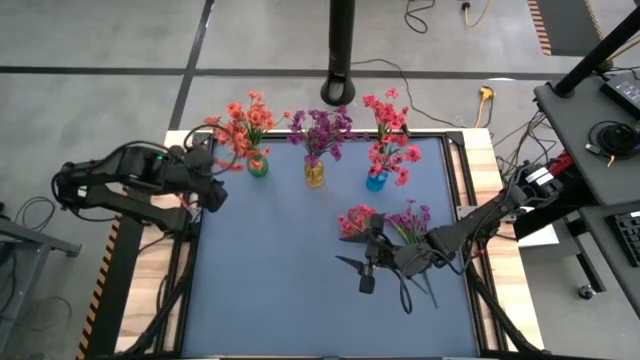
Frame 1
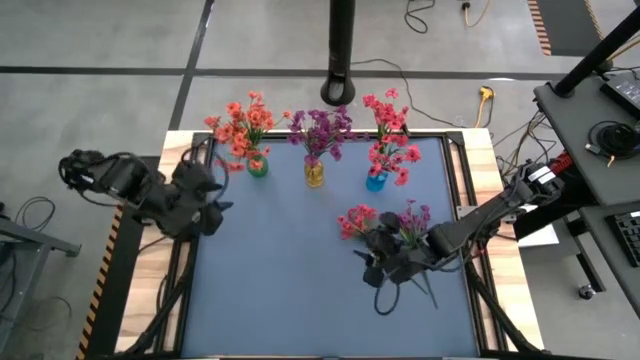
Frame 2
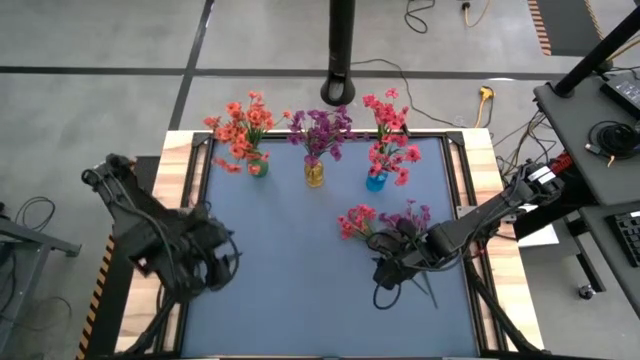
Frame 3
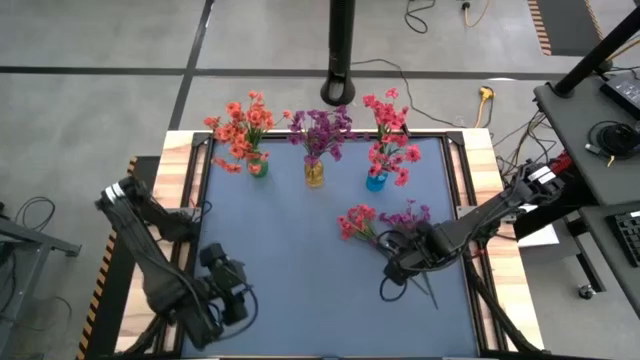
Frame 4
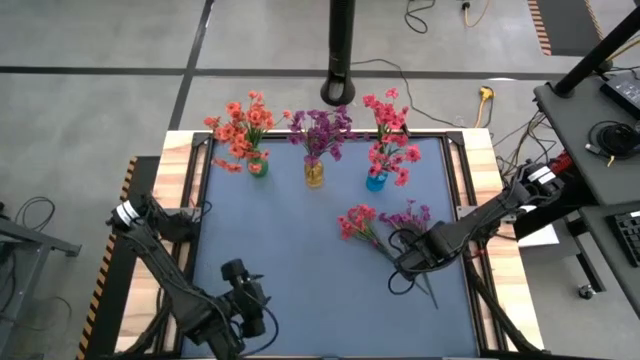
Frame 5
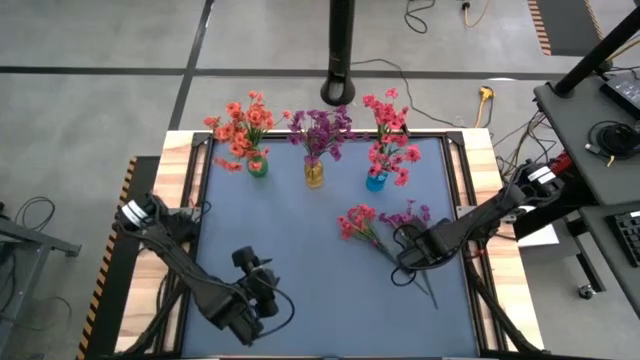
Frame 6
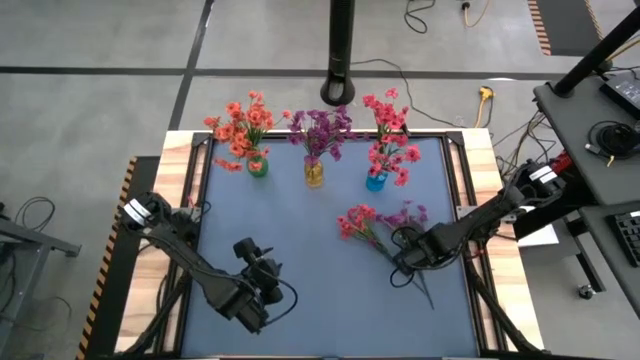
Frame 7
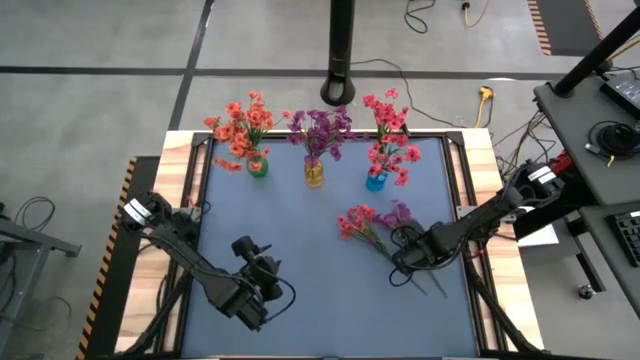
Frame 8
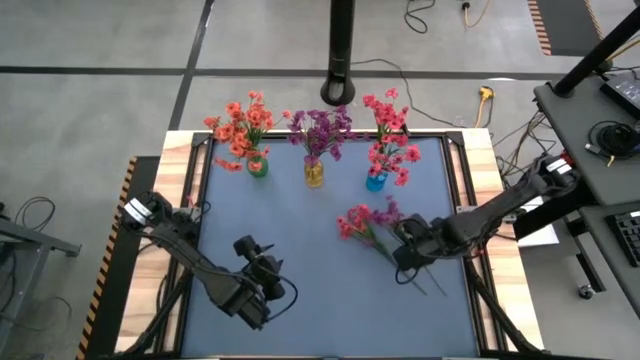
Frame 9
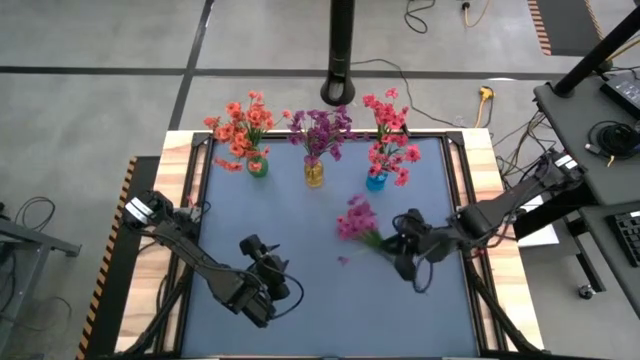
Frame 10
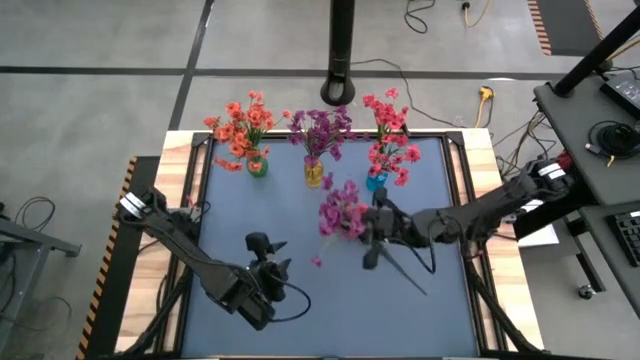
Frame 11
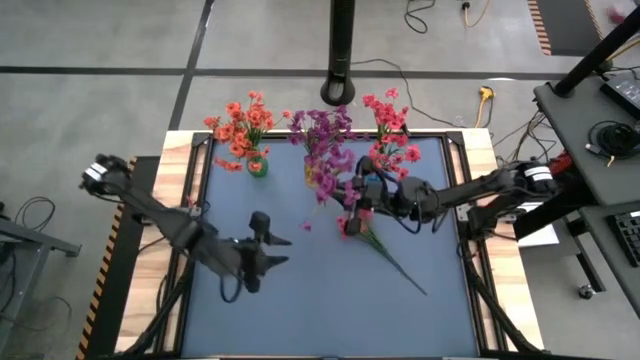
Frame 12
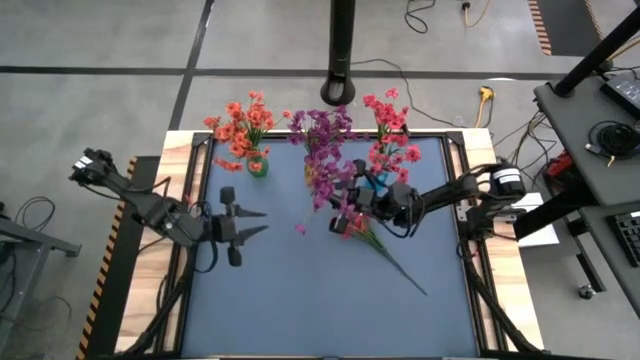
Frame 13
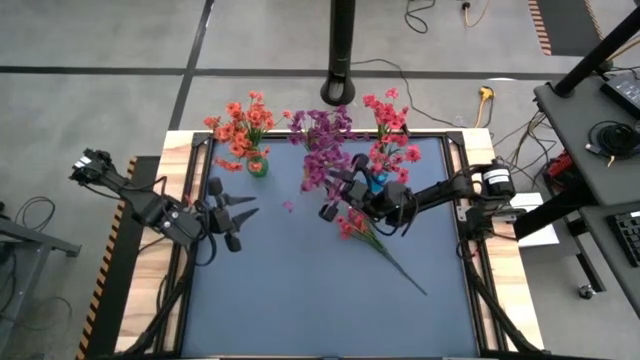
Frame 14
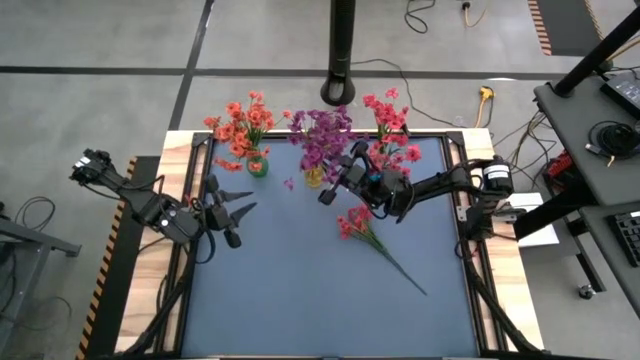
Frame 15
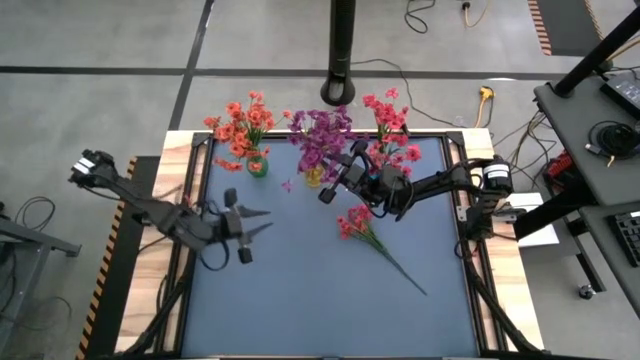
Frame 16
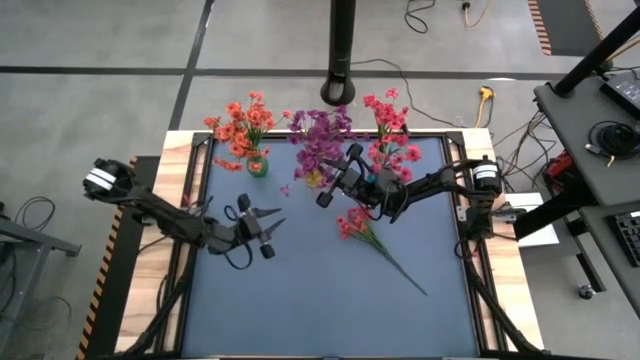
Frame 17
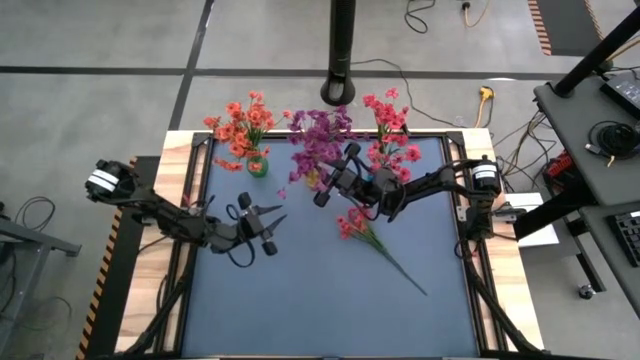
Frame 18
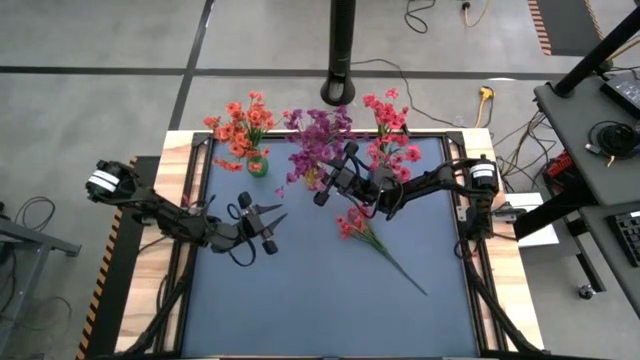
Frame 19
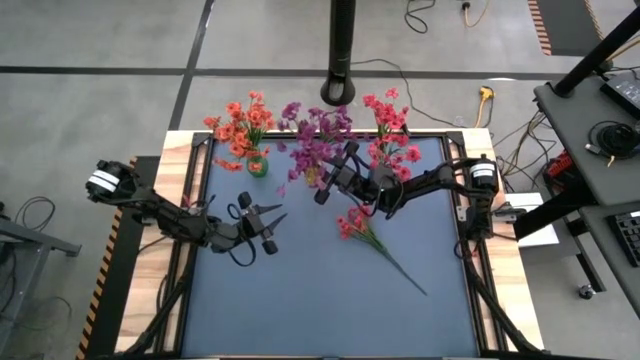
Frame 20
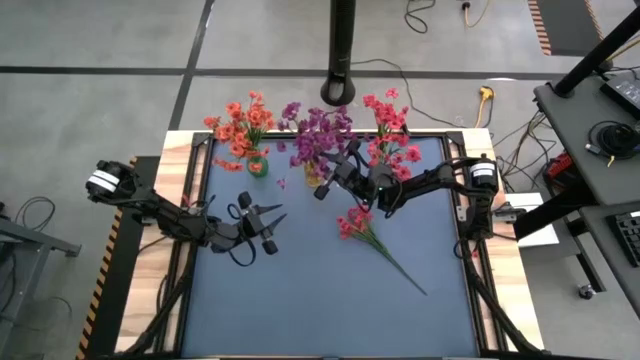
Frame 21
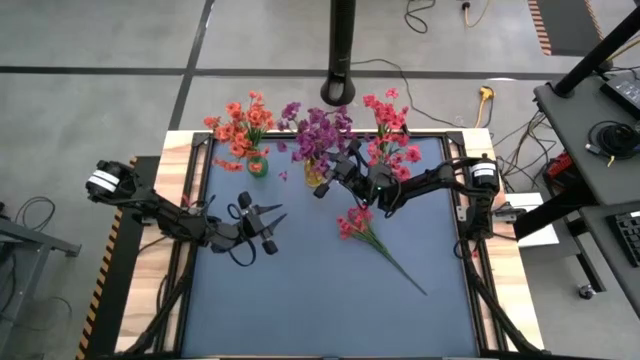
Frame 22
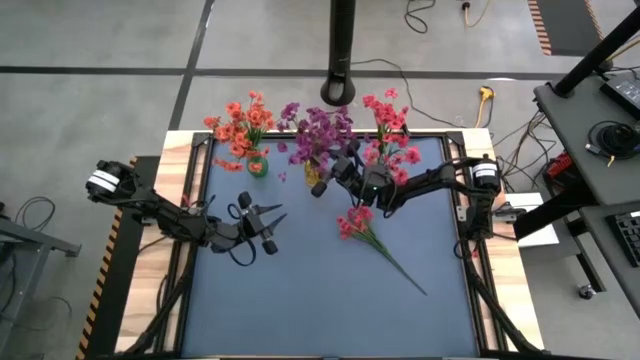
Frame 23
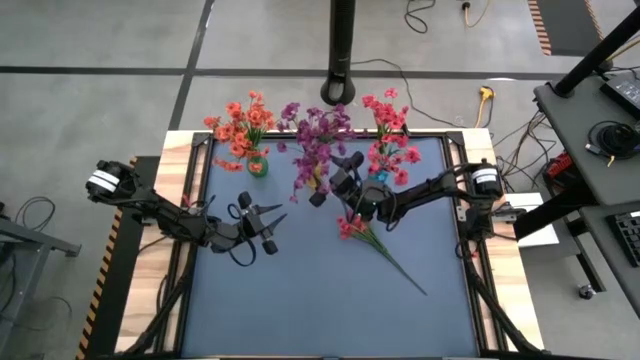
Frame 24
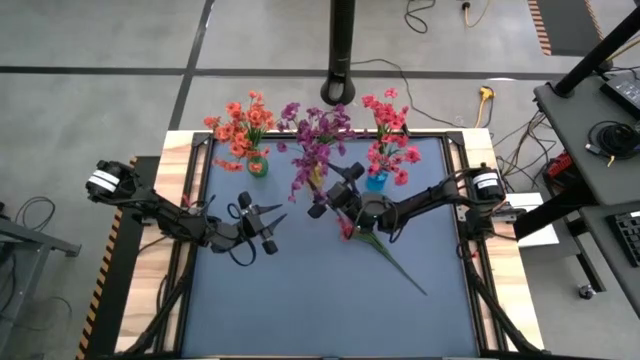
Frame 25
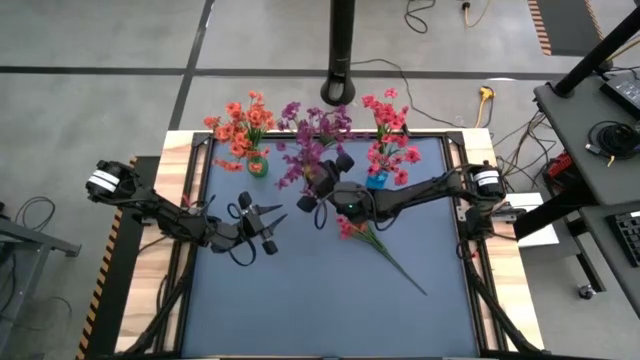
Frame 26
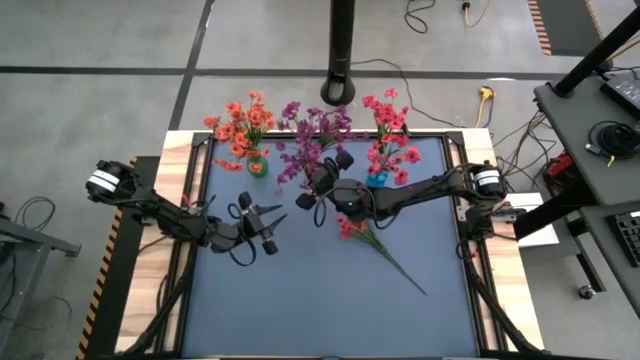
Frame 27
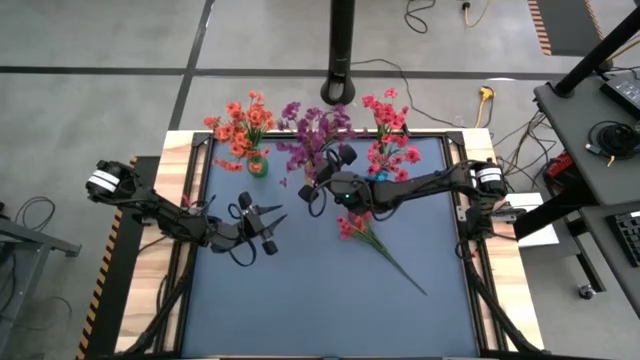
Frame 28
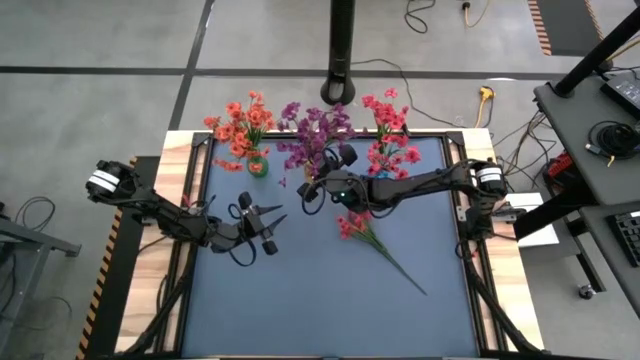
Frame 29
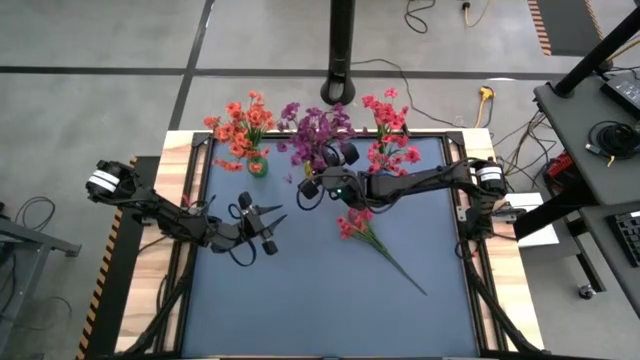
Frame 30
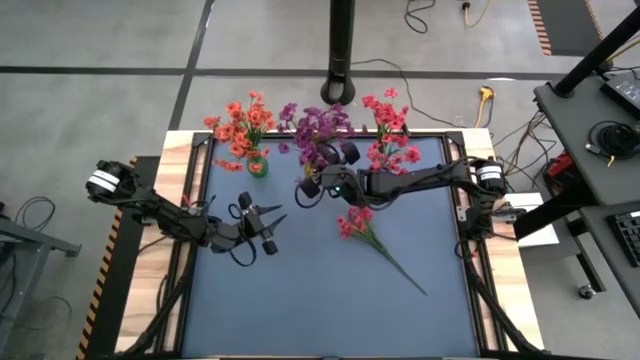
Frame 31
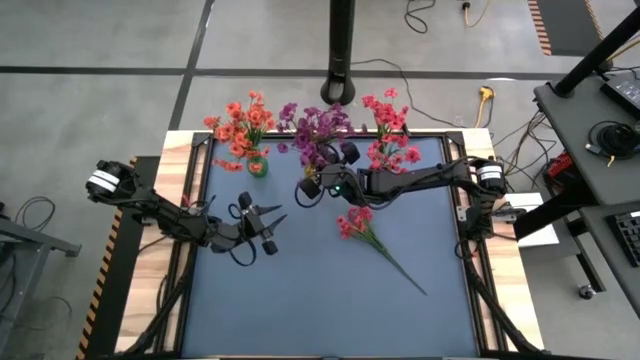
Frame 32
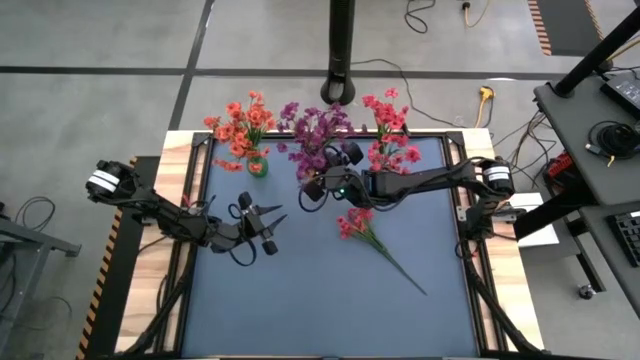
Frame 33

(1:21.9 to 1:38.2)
Task: Sort flowers into vase by color
Put the violet flowers into the yellow vase

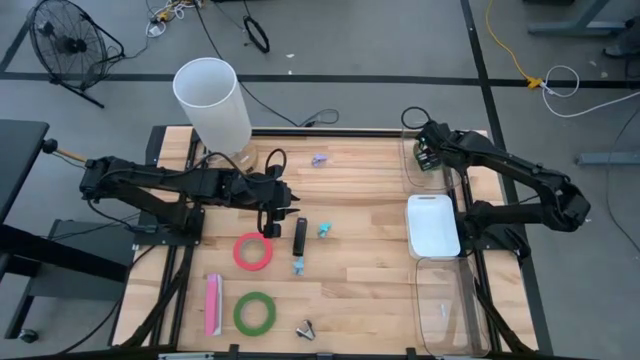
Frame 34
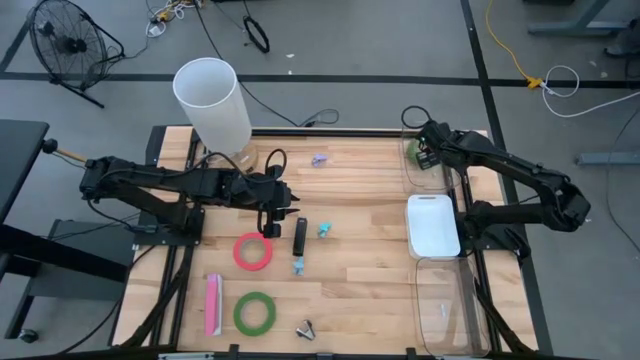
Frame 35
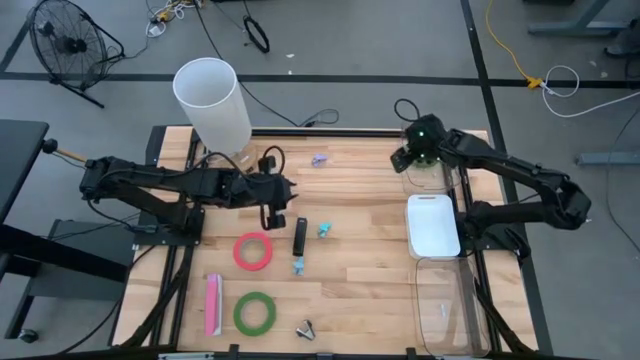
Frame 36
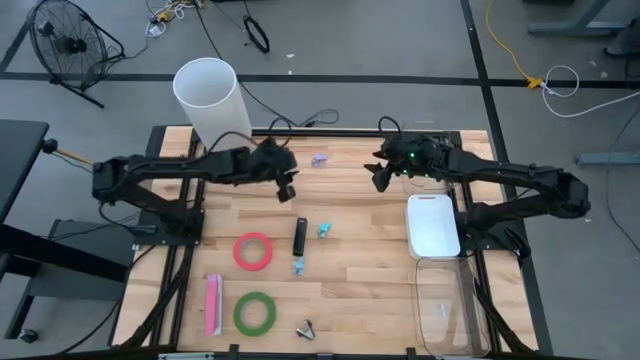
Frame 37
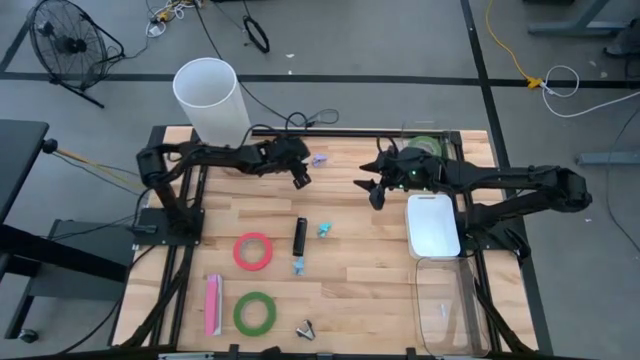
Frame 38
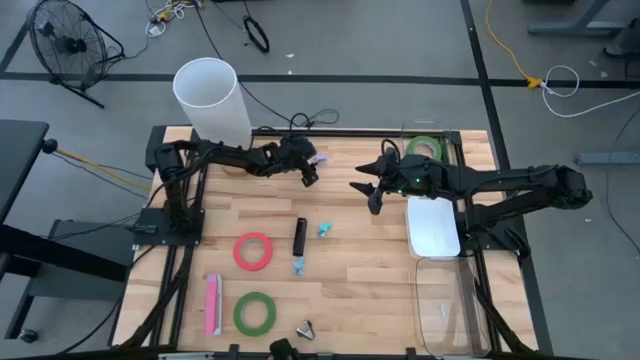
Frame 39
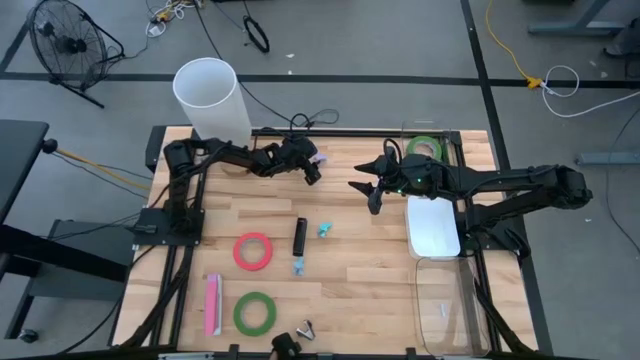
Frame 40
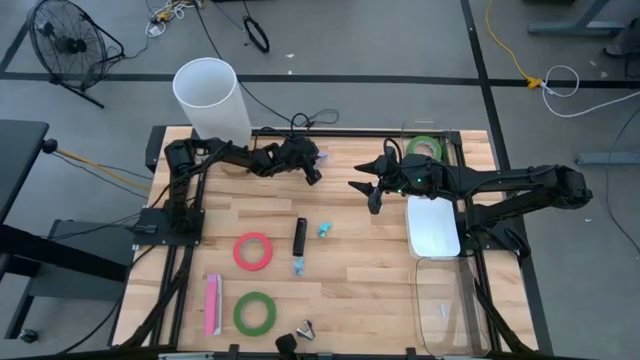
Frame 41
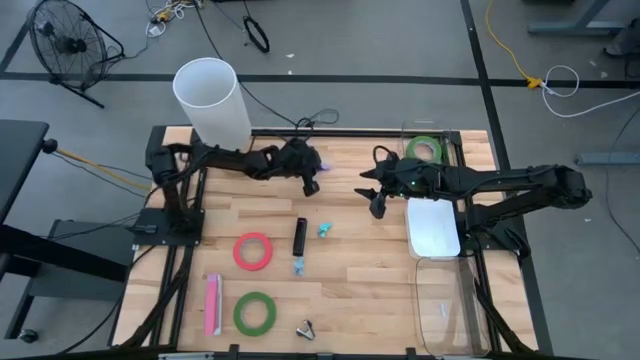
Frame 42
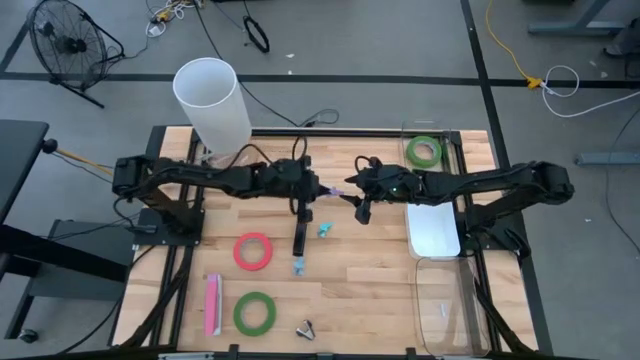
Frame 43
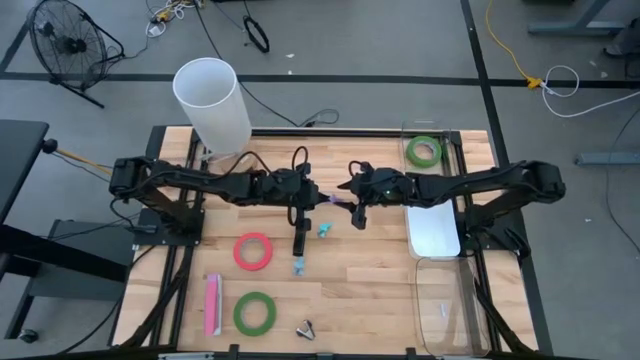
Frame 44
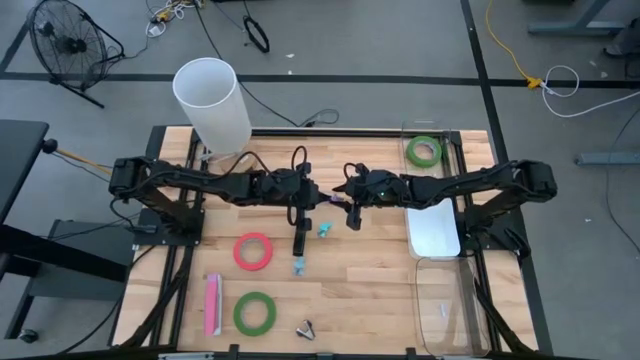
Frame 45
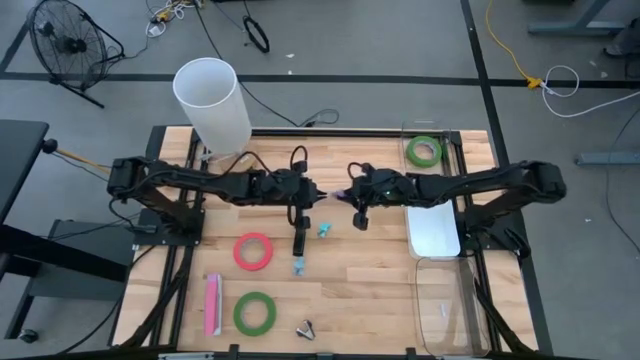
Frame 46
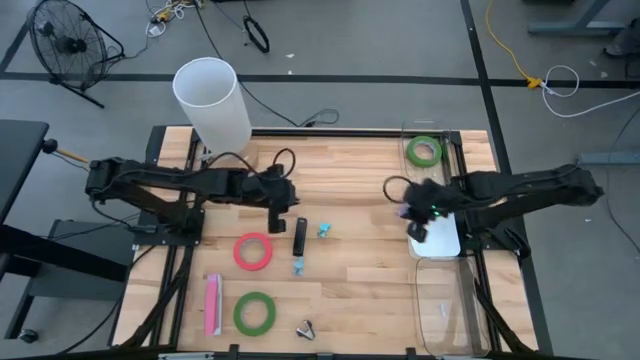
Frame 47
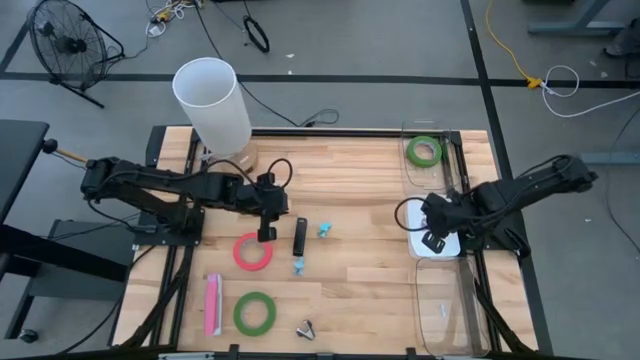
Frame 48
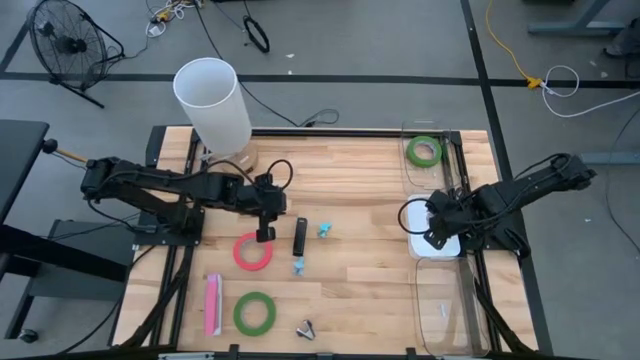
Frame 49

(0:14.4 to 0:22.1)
Task: Pick and place Stapler, Stapler remover, tape
Put the purple stapler remover into the white bin
